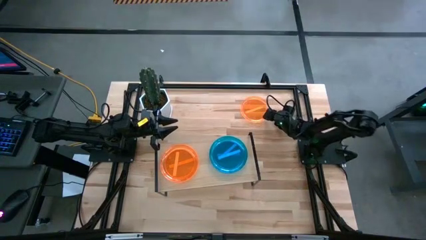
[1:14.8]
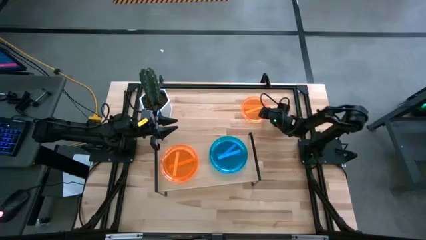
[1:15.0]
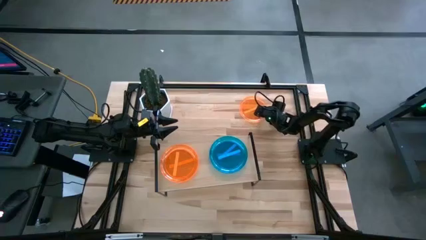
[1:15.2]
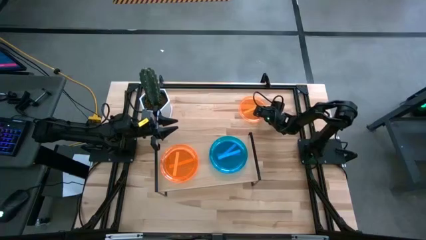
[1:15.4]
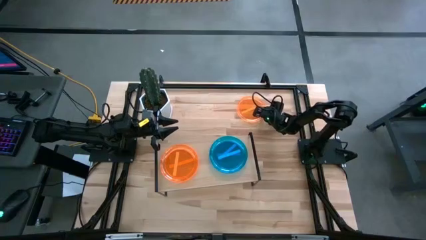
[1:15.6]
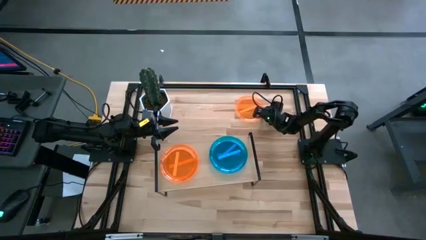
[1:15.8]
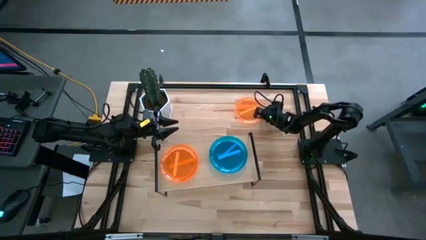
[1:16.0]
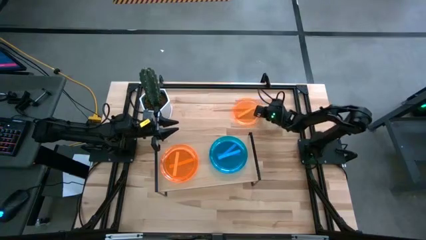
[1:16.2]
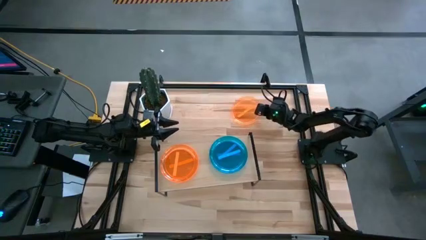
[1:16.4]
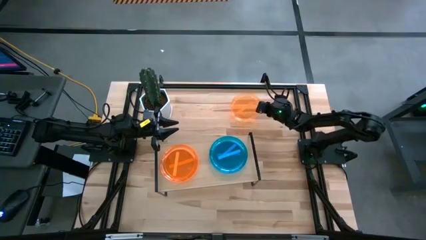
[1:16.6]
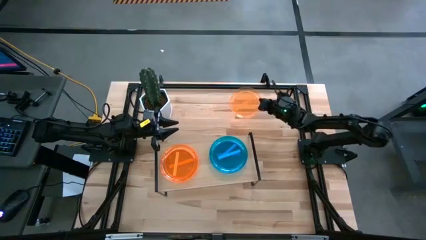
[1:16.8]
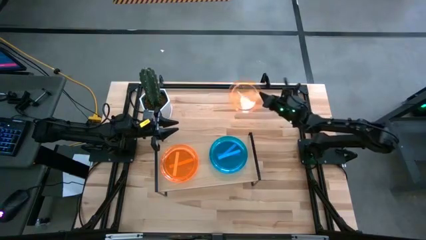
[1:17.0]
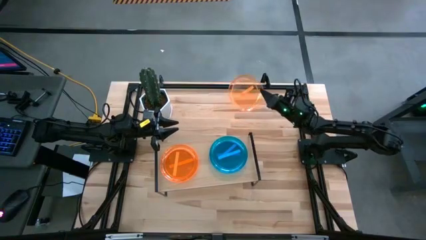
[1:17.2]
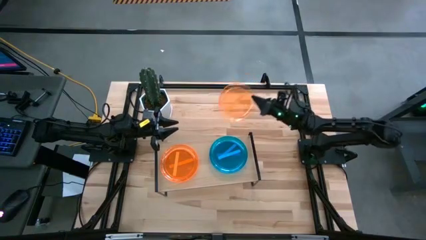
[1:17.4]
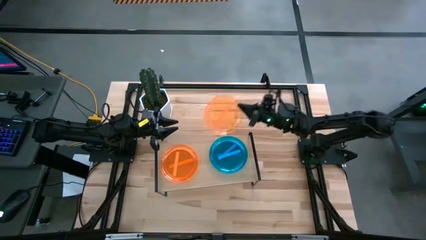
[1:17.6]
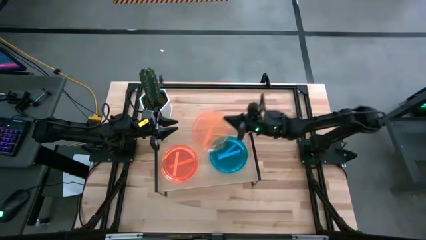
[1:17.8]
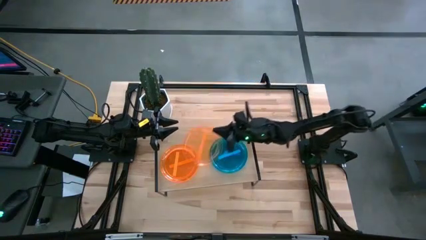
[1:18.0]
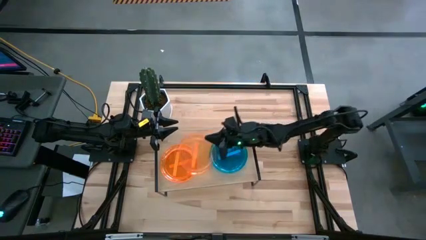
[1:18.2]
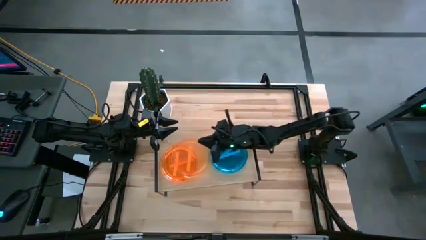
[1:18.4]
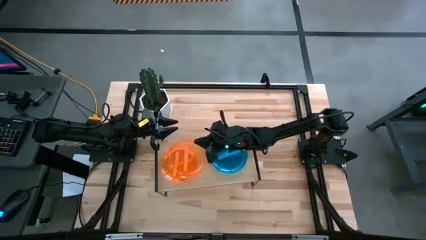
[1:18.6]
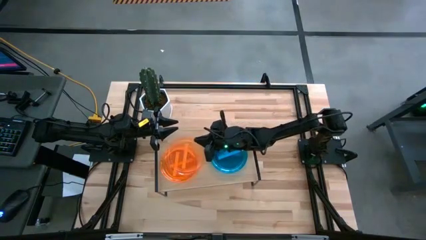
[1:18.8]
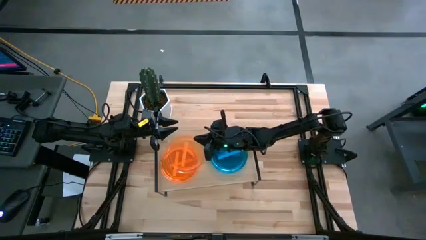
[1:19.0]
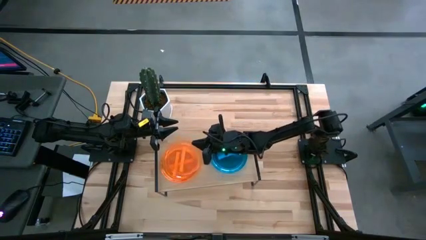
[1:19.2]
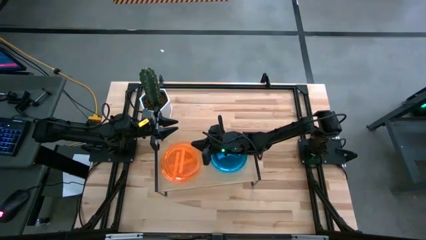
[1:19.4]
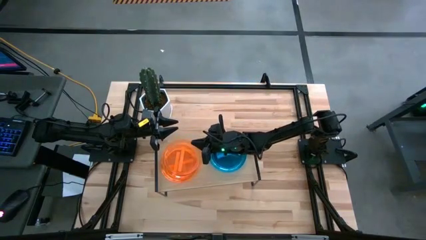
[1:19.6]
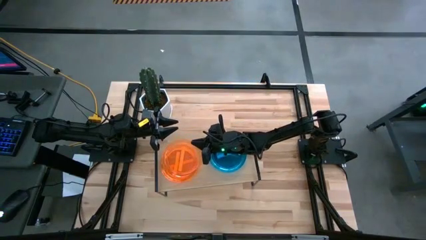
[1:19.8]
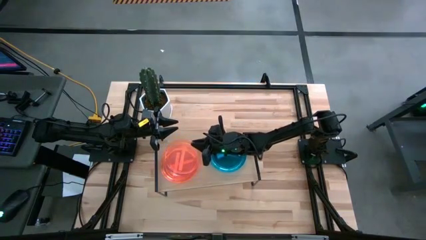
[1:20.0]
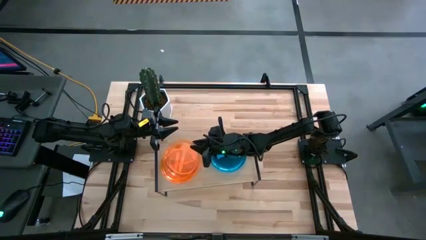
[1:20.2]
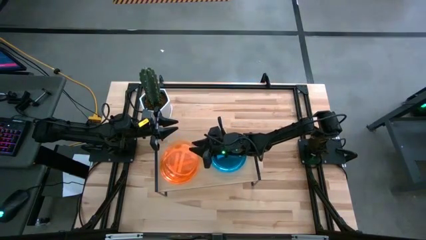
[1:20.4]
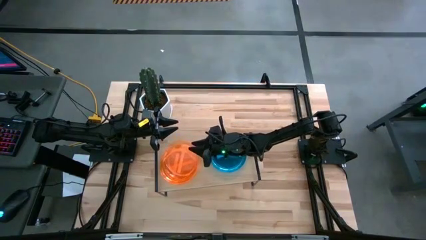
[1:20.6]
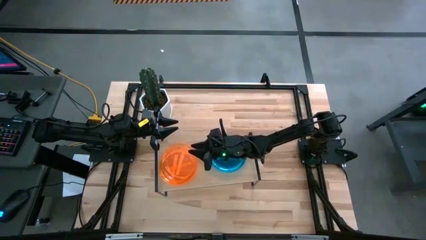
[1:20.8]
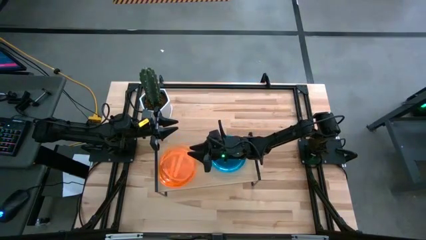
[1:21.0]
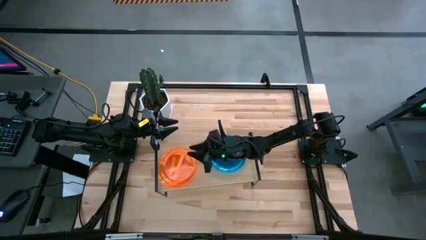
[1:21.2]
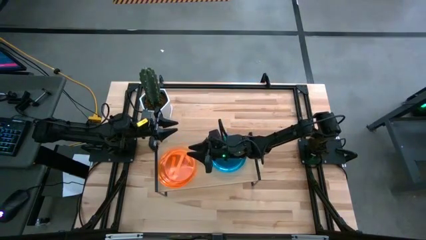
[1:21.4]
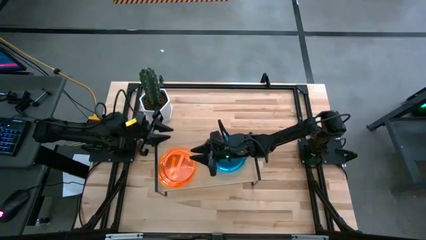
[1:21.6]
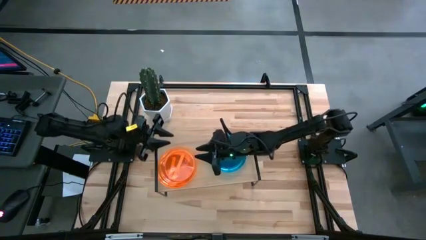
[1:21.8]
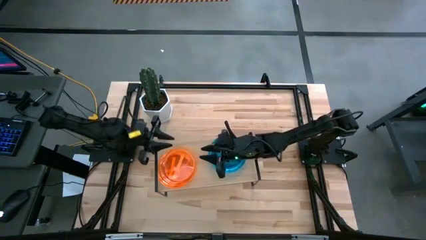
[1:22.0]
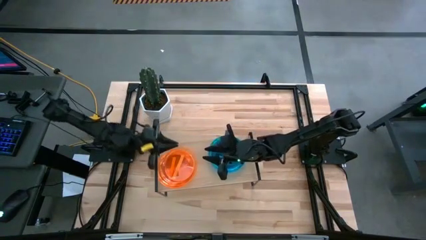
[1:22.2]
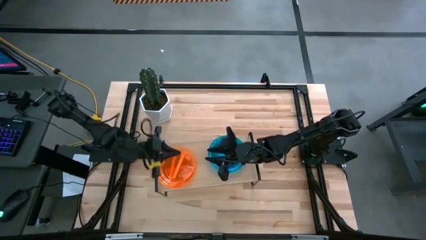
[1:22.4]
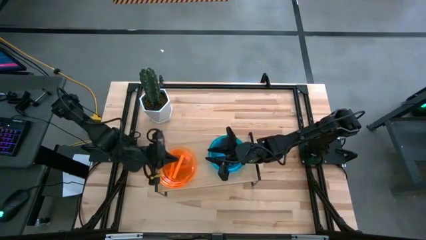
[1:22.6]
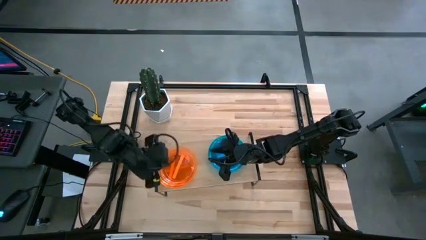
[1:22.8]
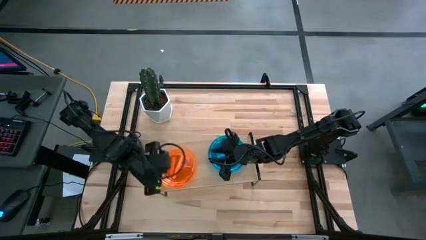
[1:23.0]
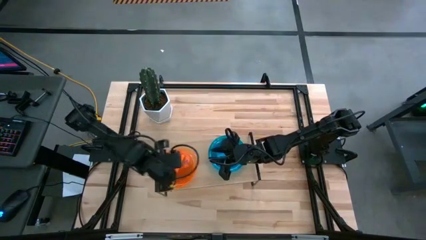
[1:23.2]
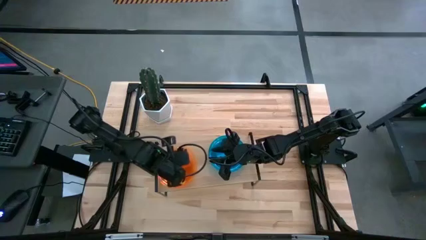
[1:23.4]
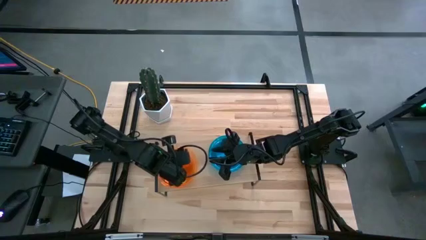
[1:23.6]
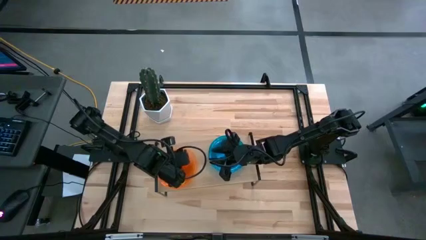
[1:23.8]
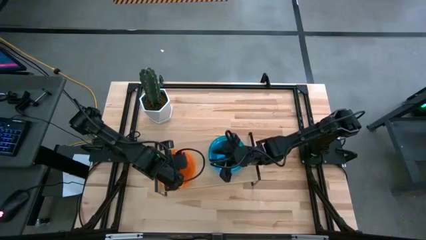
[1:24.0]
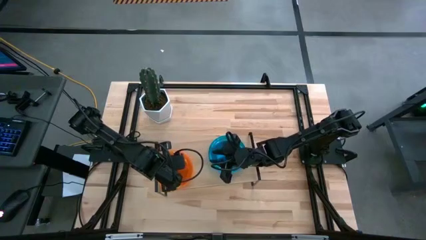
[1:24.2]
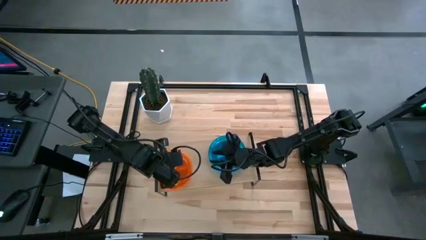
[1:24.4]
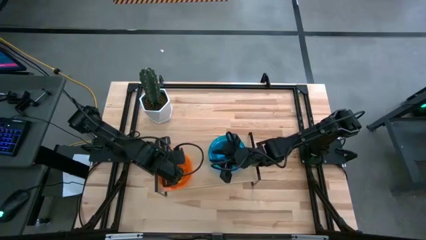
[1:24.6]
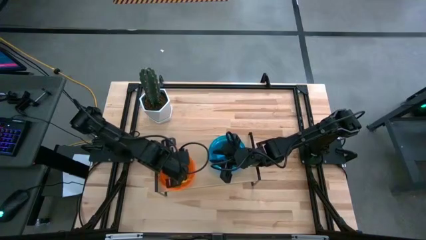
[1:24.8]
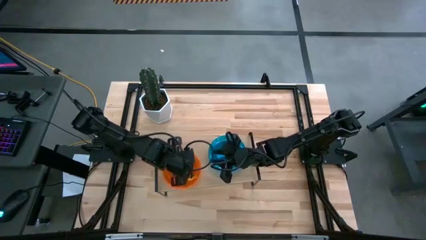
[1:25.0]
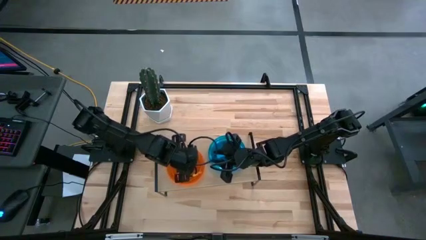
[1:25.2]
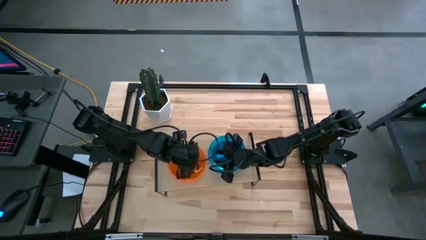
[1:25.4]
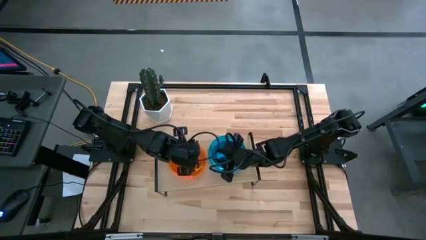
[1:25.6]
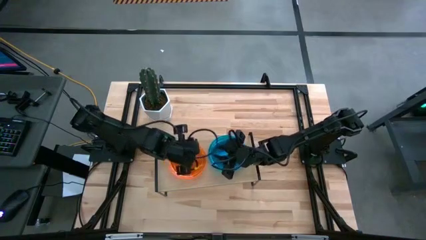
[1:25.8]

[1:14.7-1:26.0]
Task: Place and stack plates onto a shelf
Stack the orange transparent plate on top of the orange transparent plate
